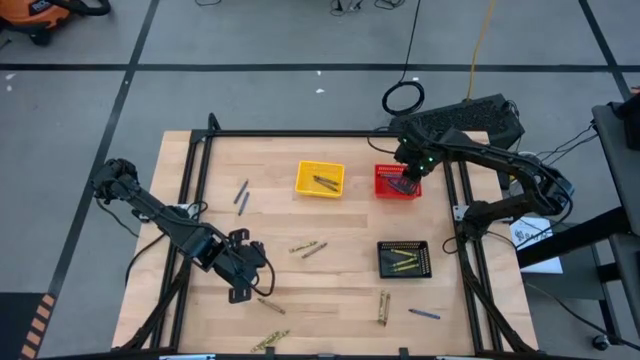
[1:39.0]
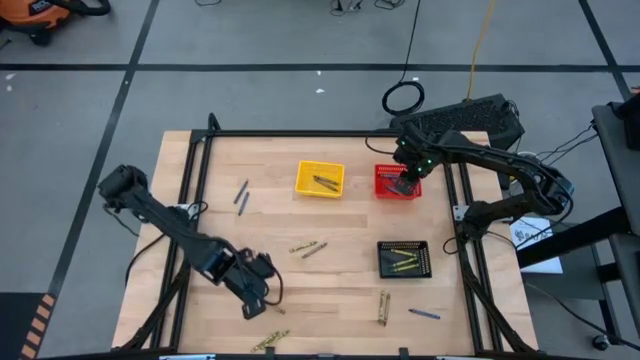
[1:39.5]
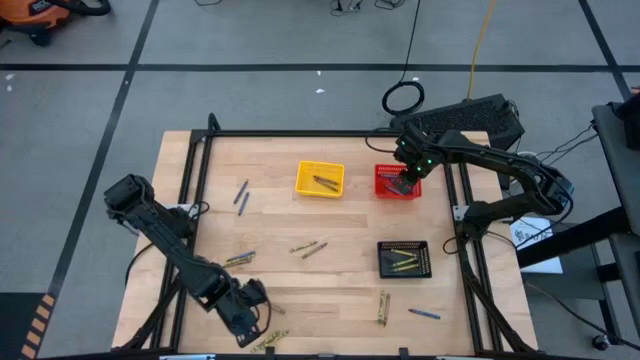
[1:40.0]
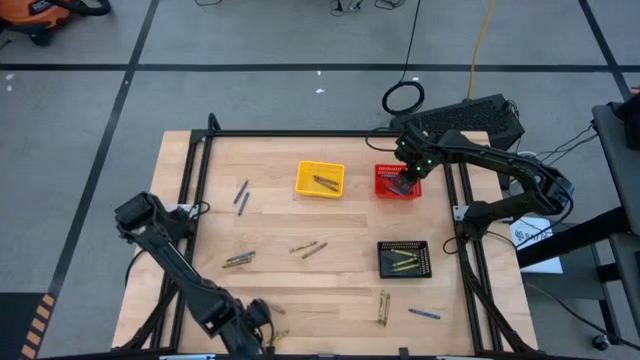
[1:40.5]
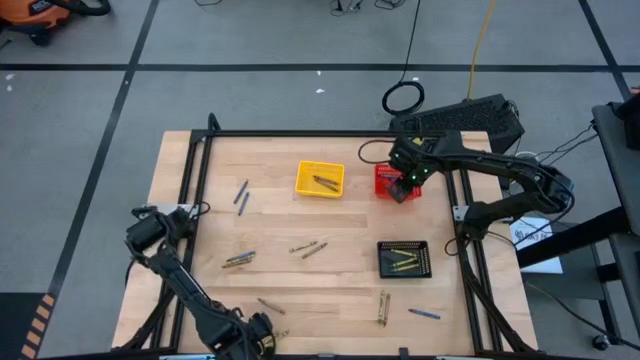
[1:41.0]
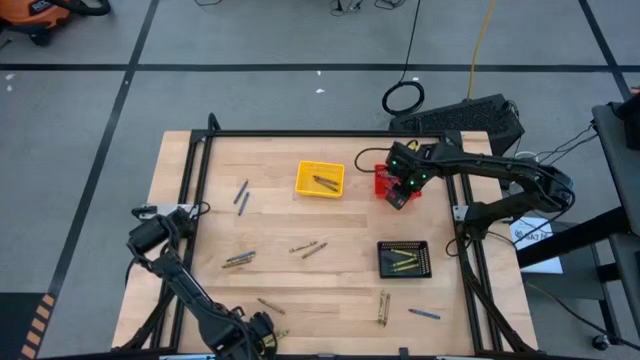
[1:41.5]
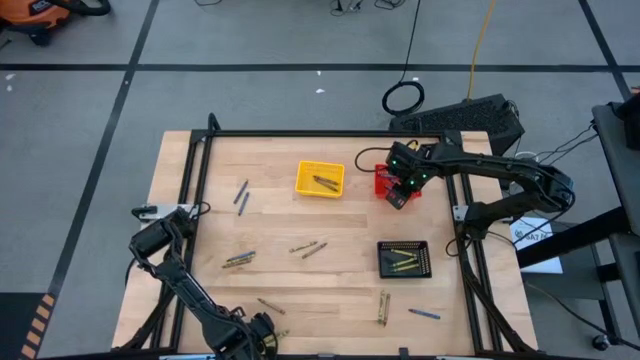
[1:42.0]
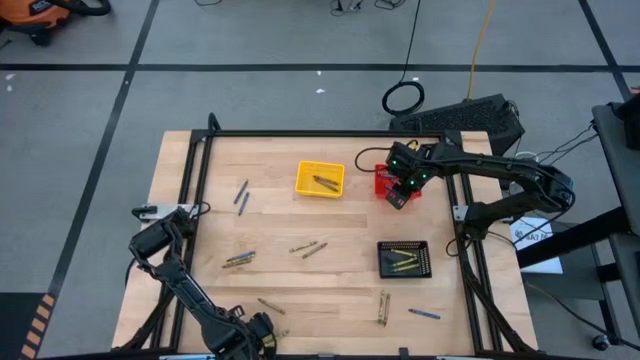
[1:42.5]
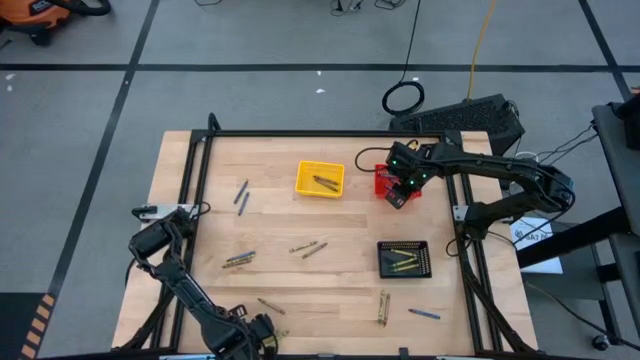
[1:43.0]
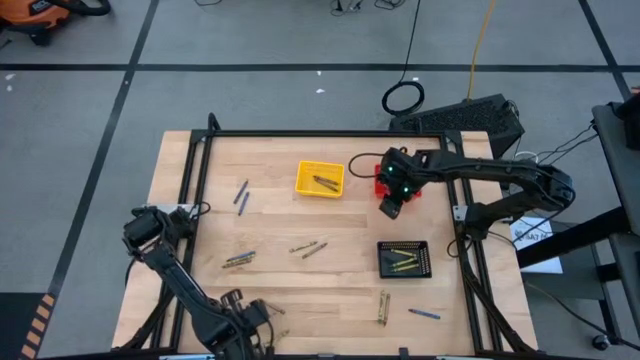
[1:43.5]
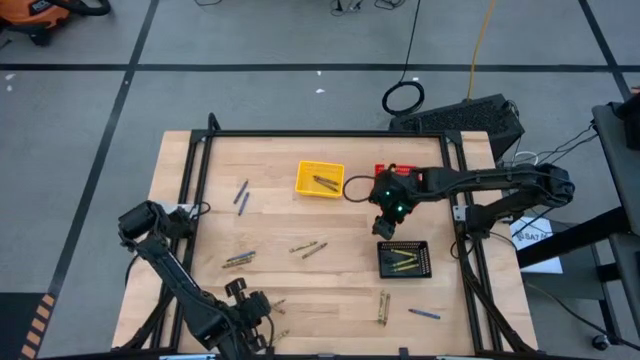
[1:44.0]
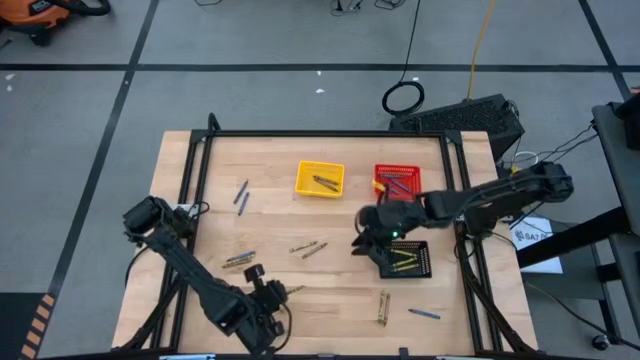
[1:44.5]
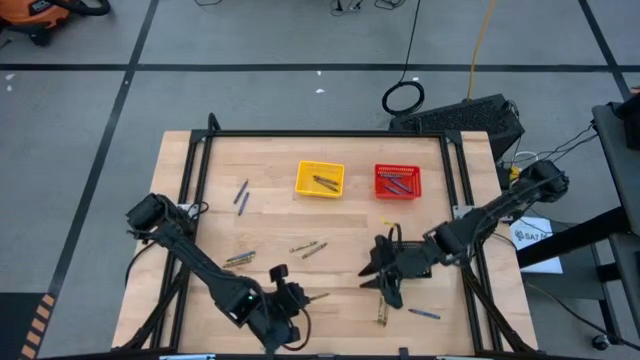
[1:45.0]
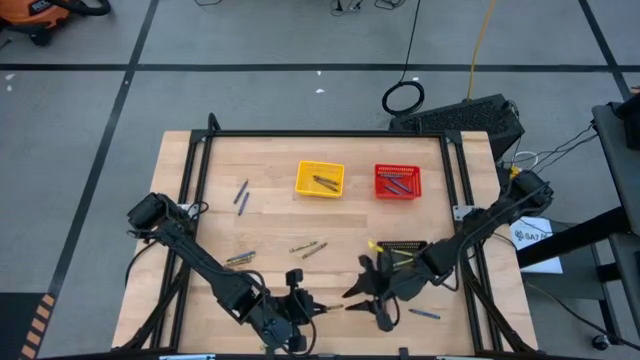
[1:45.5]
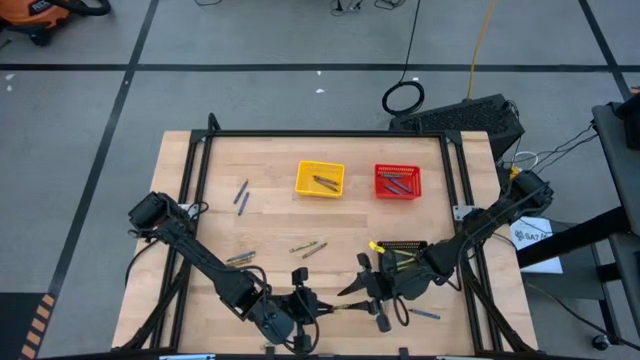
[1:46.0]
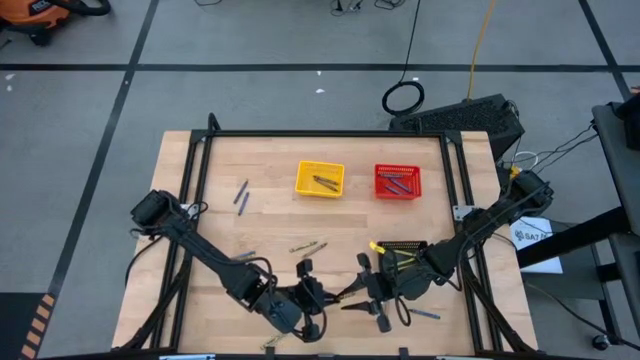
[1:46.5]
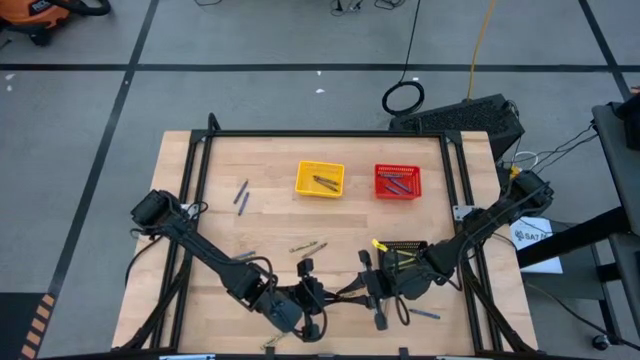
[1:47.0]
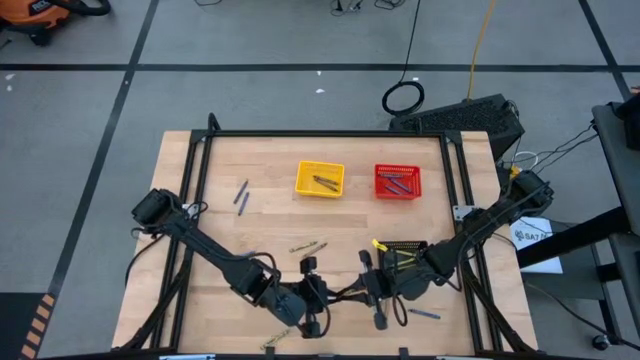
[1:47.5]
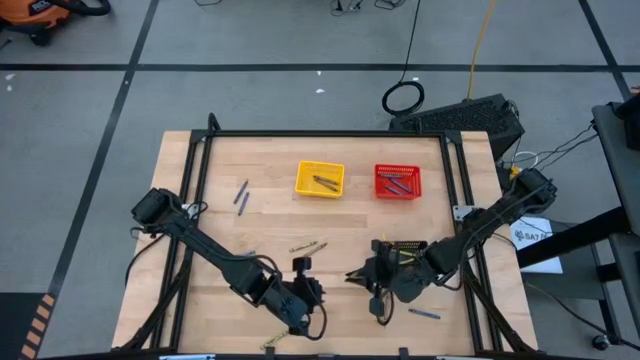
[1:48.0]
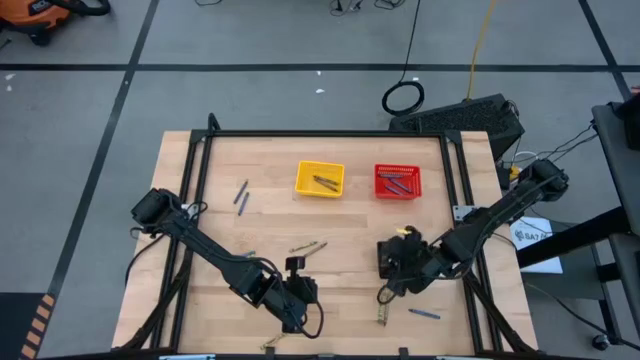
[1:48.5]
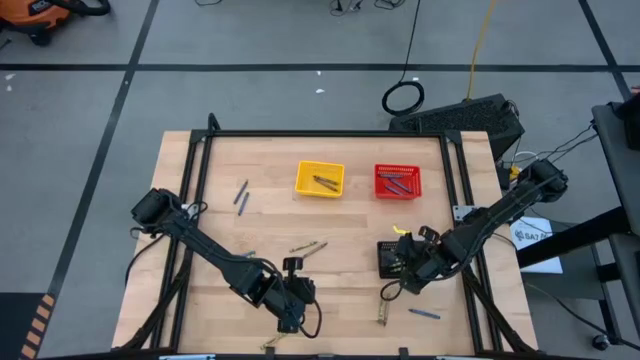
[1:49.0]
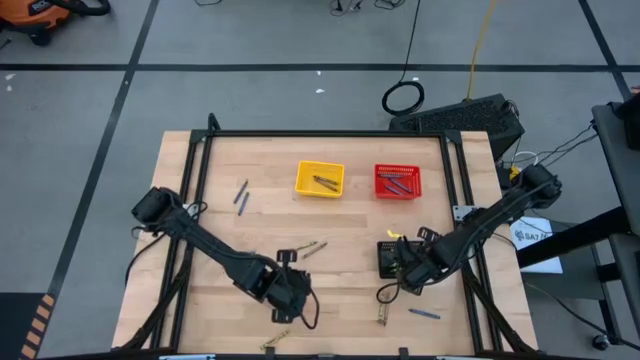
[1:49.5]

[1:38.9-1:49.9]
Task: Sort crayons
Put the green crayon into the black bin

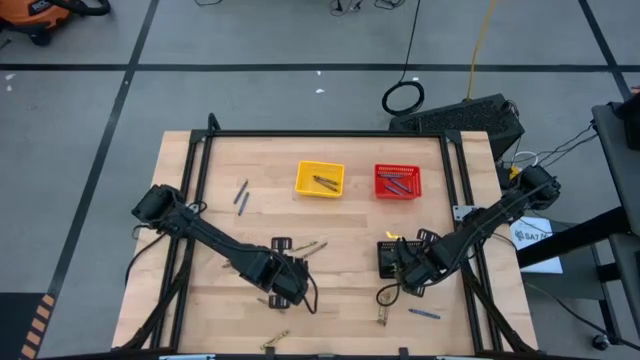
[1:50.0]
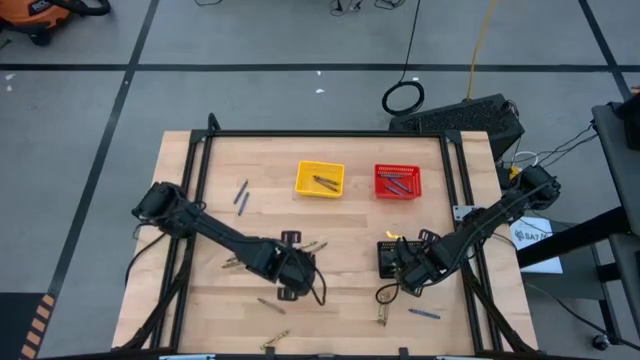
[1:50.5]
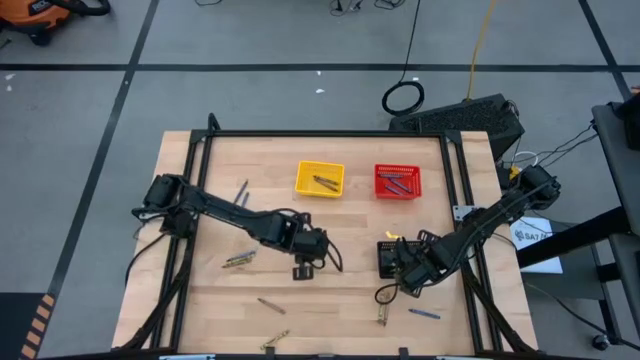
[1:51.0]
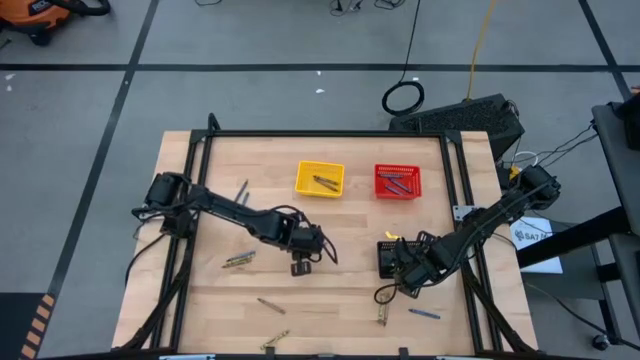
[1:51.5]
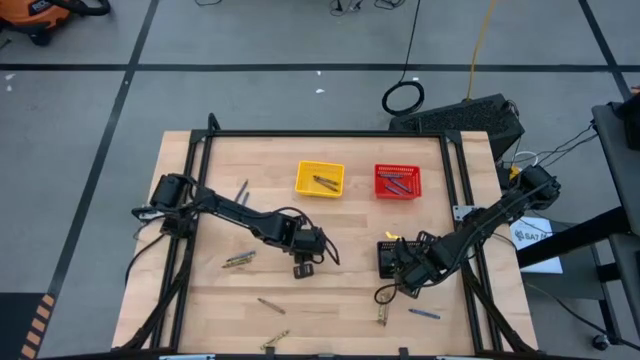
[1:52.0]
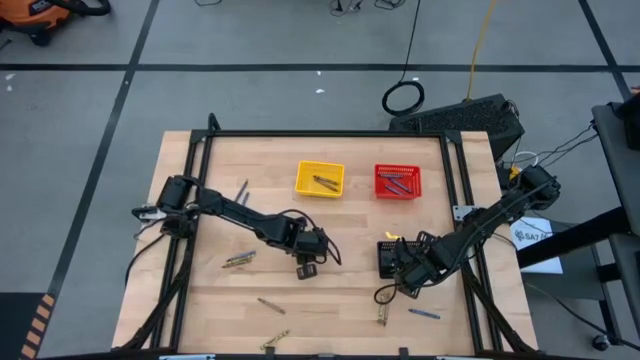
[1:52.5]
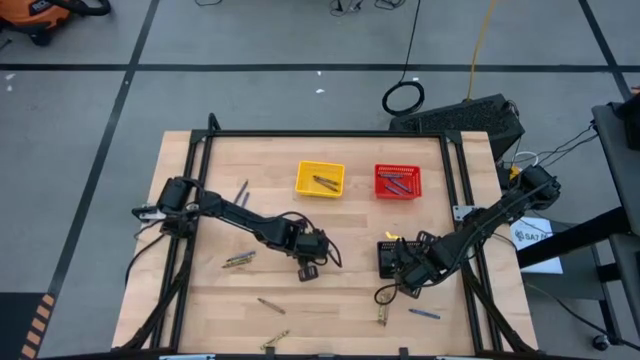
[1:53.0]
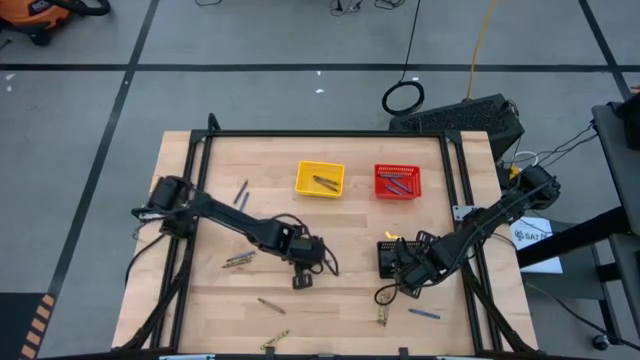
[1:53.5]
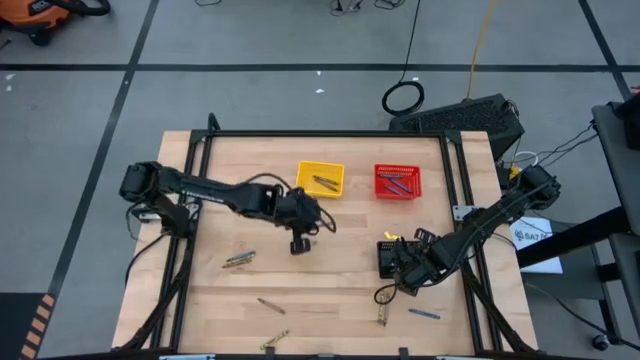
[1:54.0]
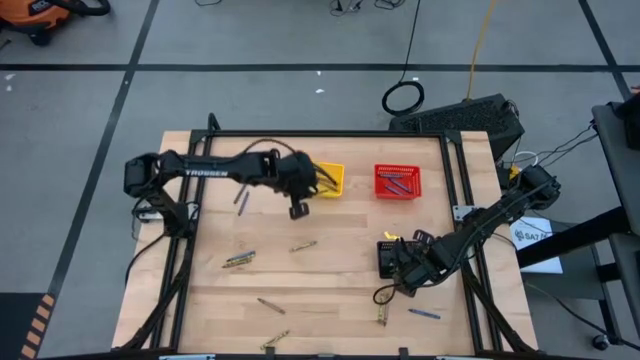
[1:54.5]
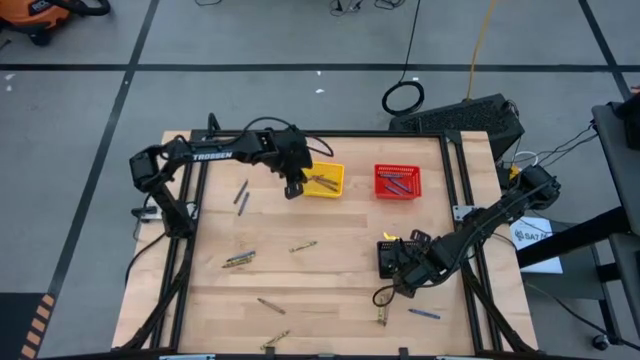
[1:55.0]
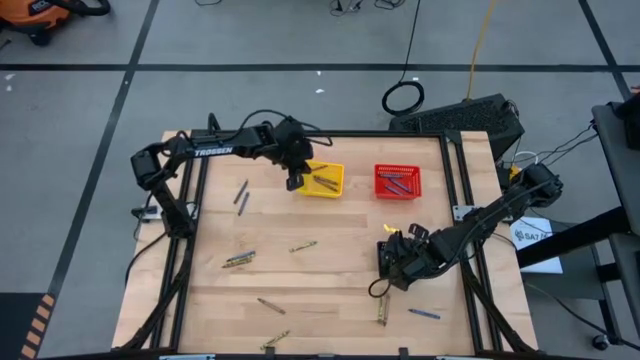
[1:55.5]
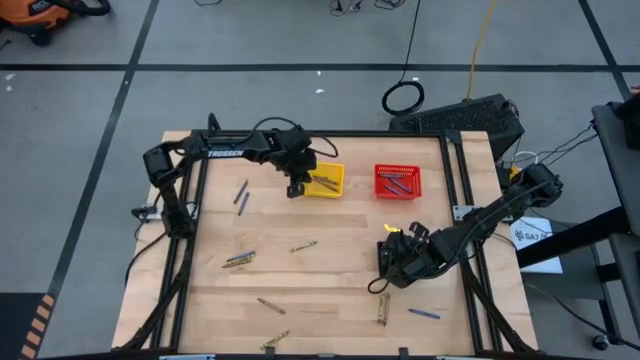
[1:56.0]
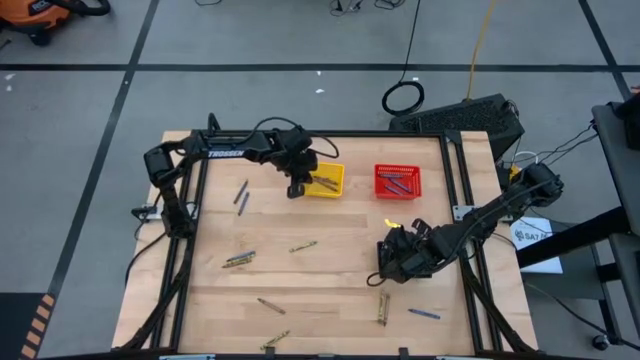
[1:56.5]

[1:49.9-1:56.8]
Put the brown crayon into the yellow bin

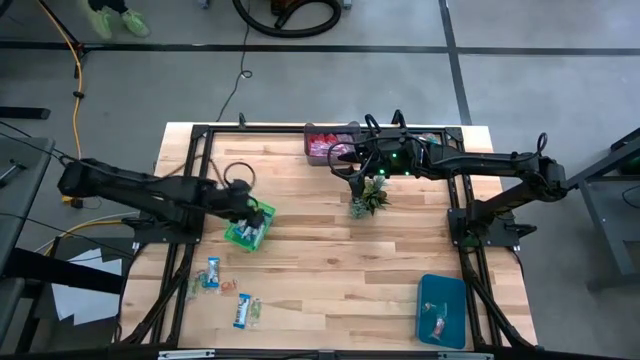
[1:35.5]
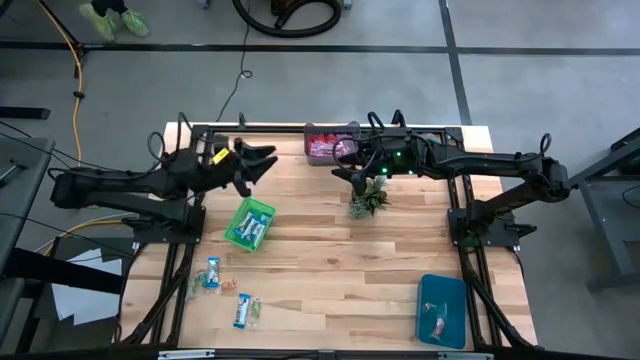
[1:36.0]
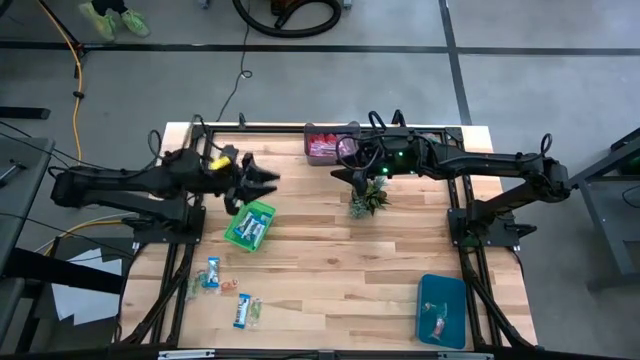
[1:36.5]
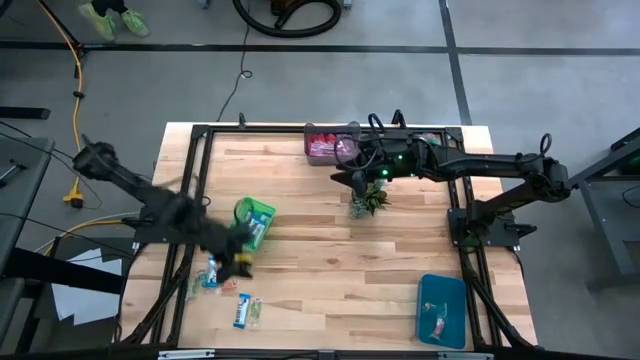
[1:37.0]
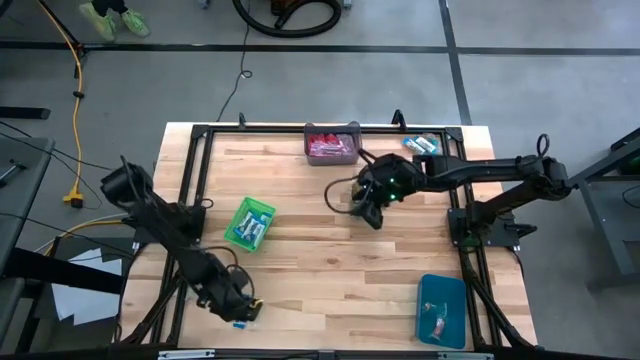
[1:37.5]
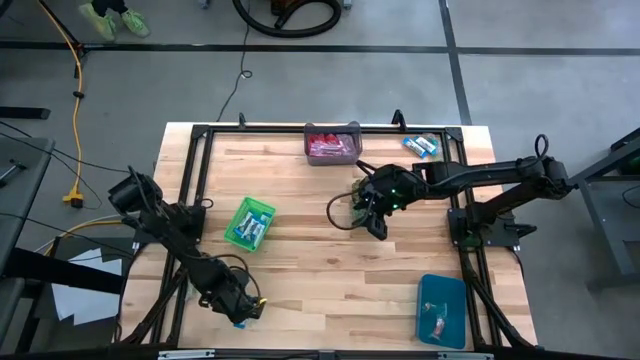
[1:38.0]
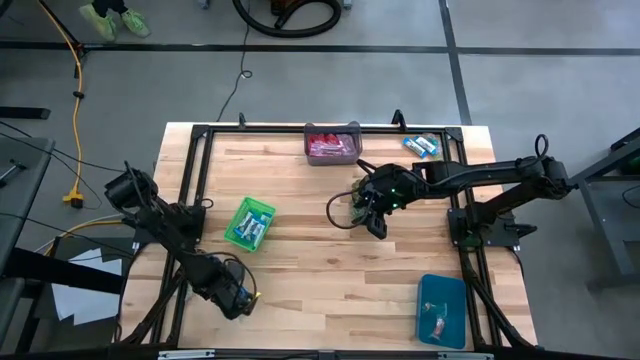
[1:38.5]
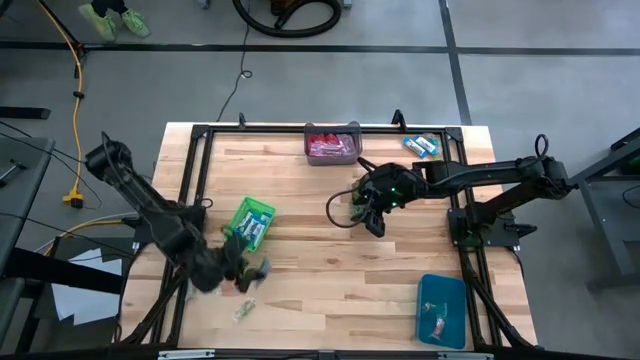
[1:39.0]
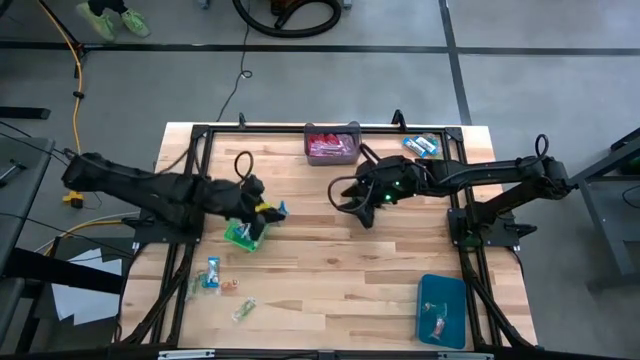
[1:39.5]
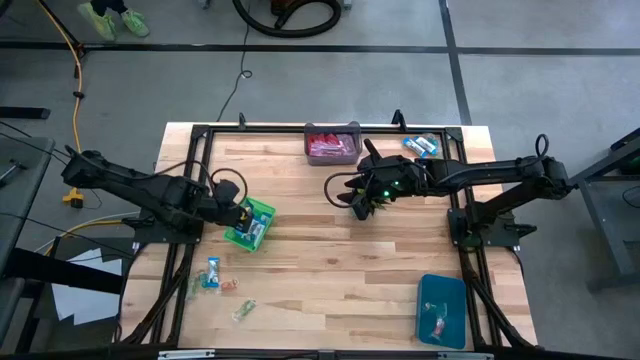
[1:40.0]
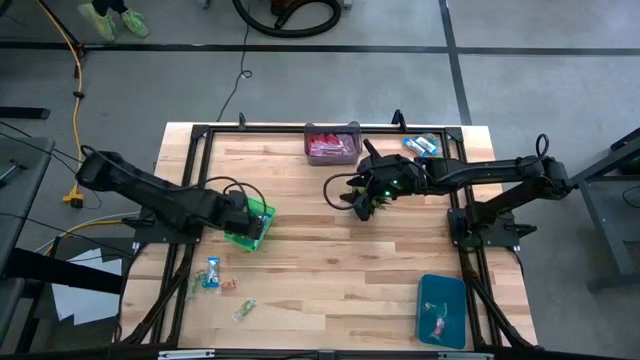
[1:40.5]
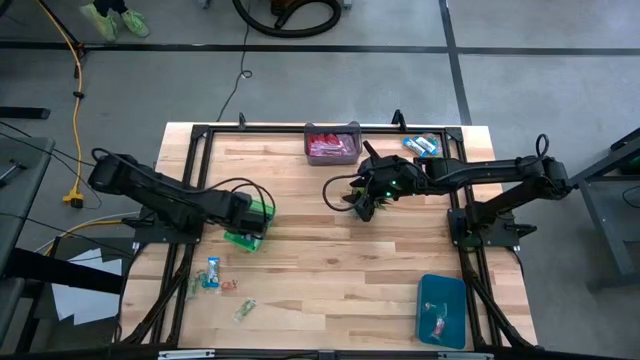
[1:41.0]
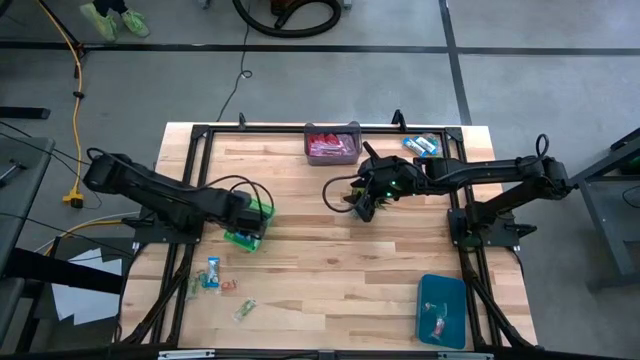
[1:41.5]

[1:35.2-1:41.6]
Task: Sort candy
Put the white candy into the green bin
